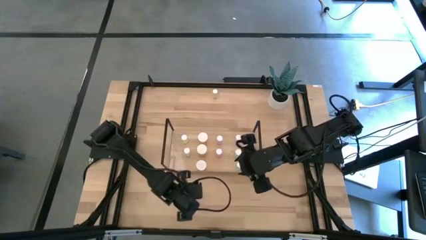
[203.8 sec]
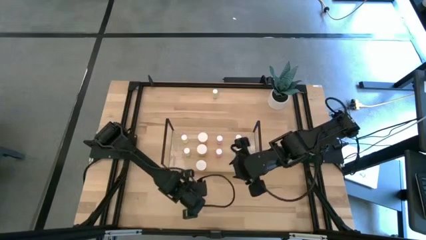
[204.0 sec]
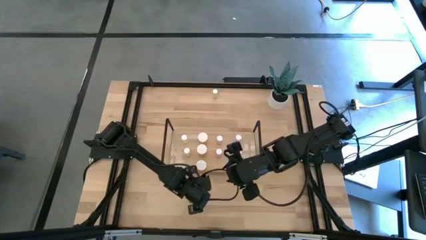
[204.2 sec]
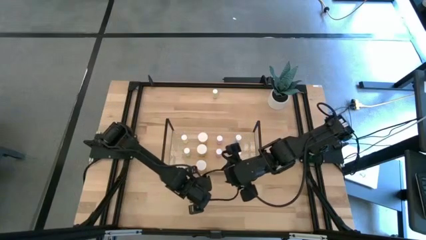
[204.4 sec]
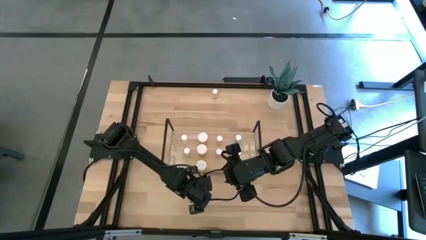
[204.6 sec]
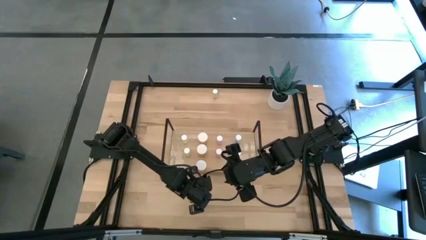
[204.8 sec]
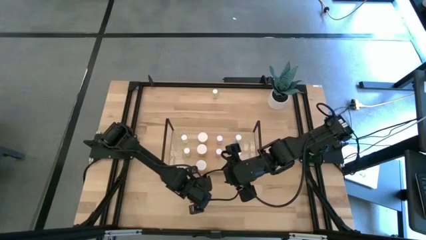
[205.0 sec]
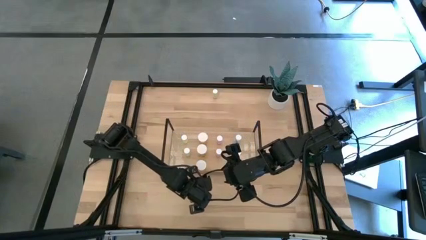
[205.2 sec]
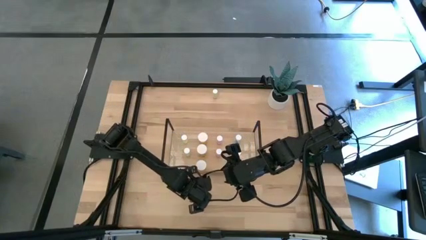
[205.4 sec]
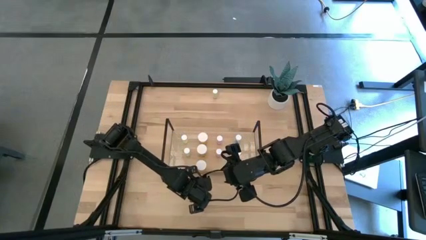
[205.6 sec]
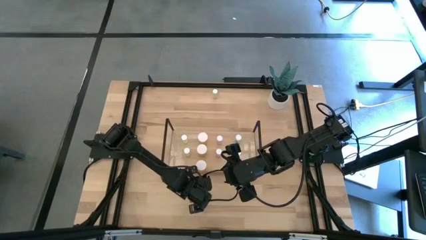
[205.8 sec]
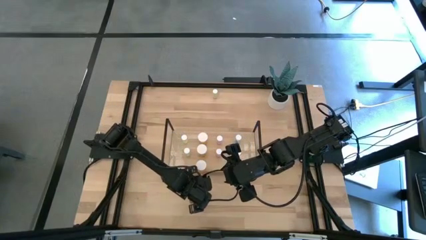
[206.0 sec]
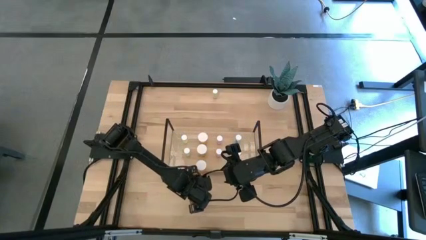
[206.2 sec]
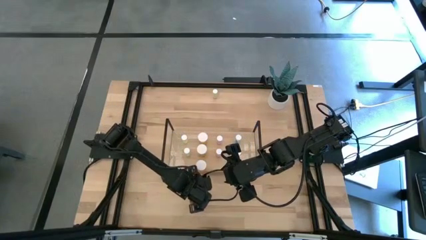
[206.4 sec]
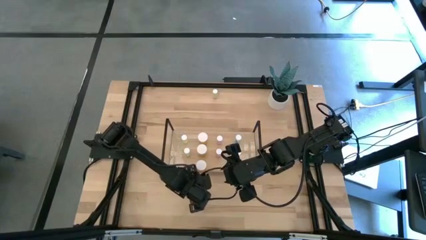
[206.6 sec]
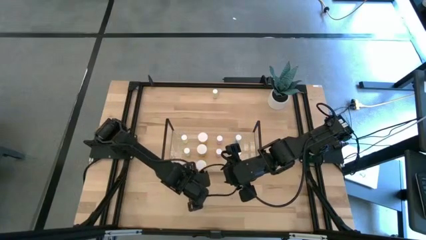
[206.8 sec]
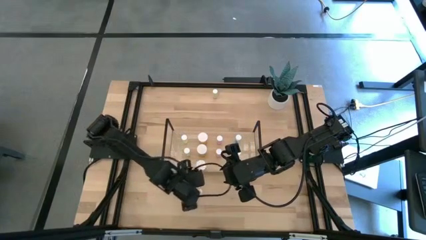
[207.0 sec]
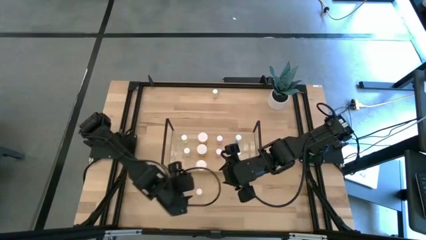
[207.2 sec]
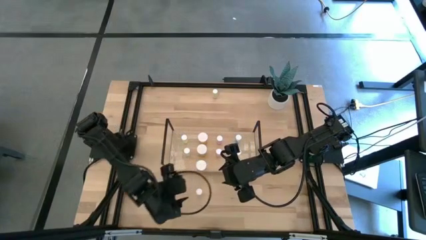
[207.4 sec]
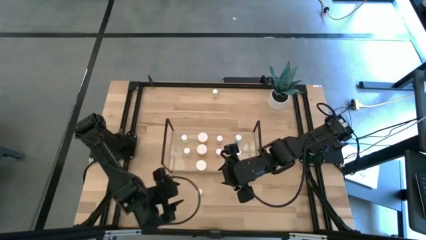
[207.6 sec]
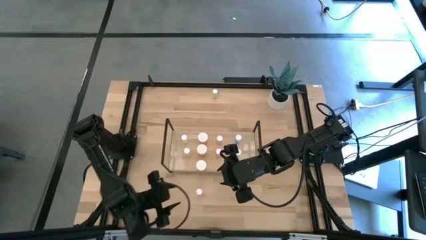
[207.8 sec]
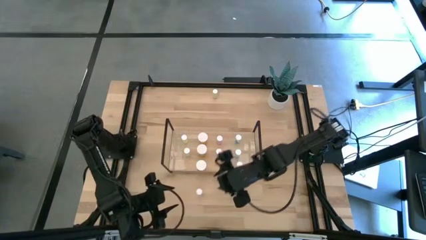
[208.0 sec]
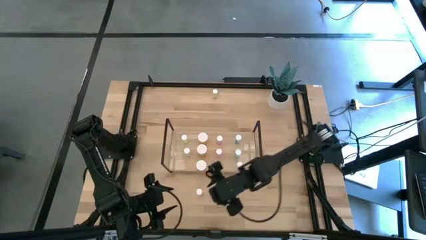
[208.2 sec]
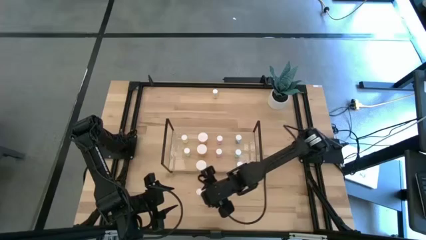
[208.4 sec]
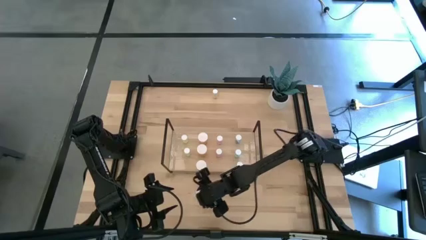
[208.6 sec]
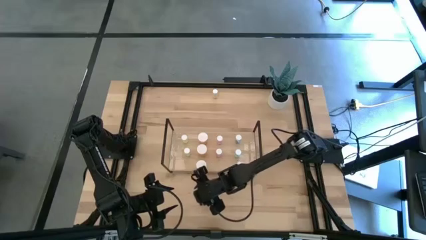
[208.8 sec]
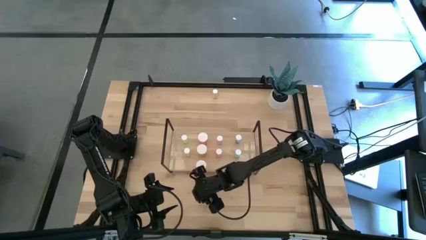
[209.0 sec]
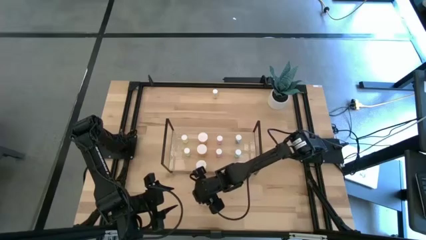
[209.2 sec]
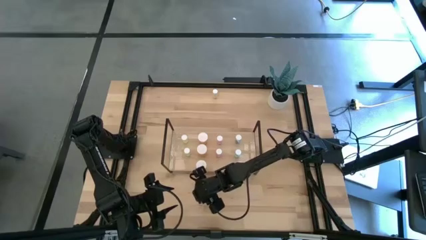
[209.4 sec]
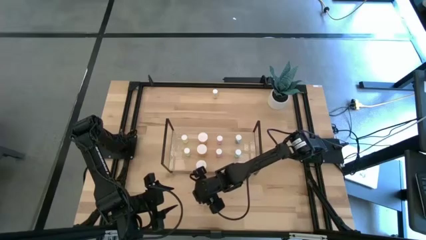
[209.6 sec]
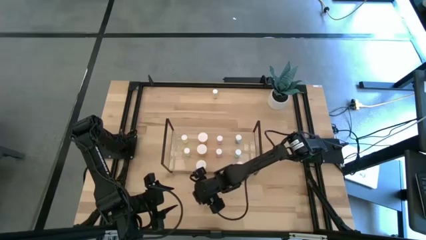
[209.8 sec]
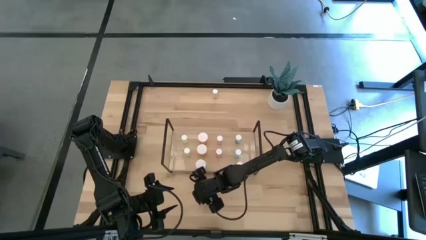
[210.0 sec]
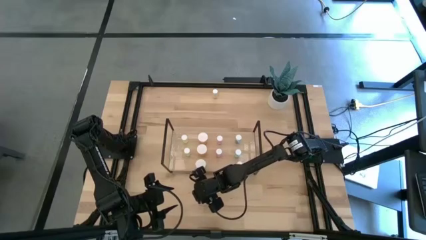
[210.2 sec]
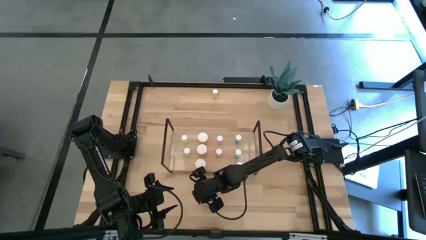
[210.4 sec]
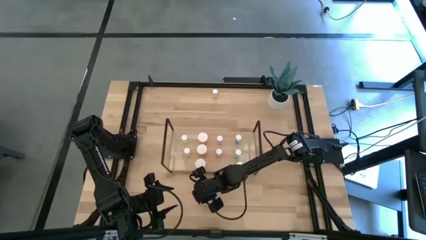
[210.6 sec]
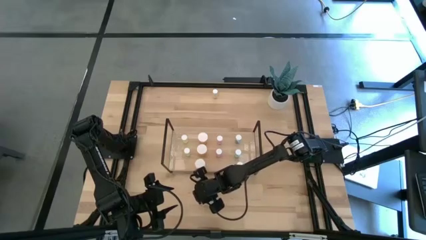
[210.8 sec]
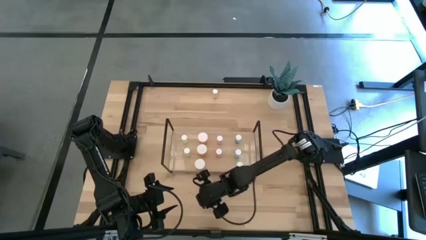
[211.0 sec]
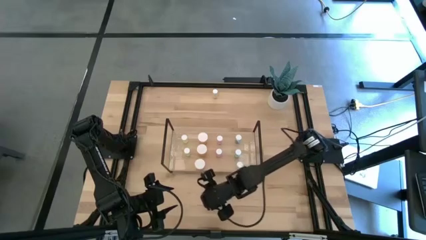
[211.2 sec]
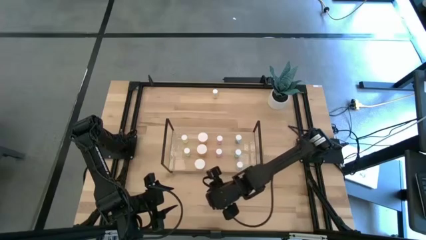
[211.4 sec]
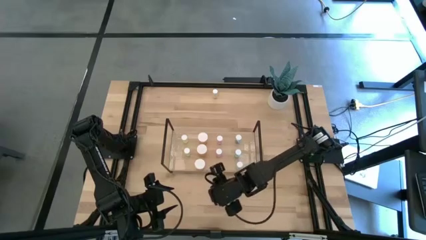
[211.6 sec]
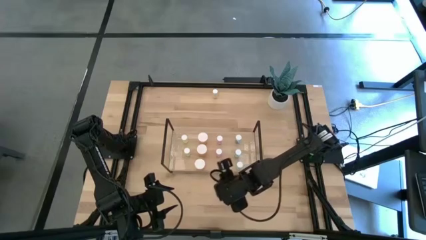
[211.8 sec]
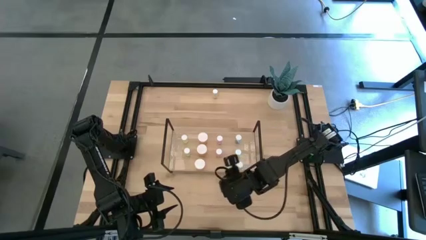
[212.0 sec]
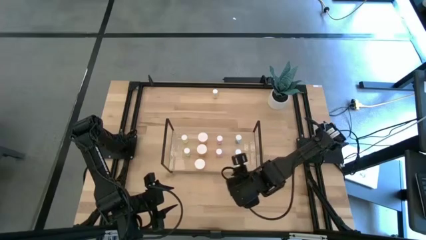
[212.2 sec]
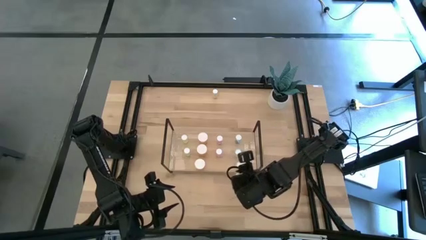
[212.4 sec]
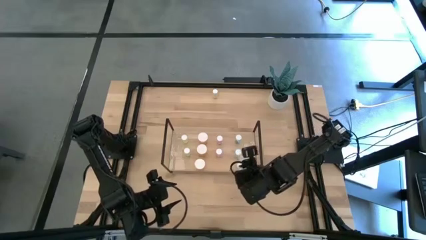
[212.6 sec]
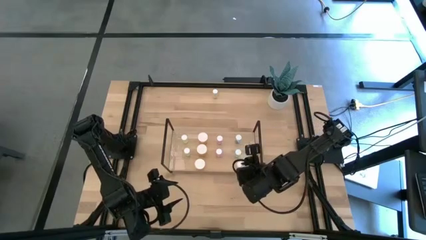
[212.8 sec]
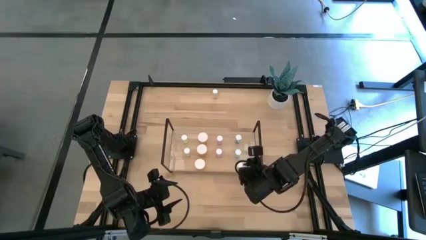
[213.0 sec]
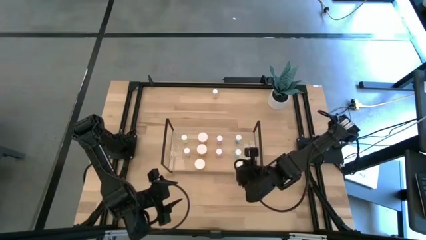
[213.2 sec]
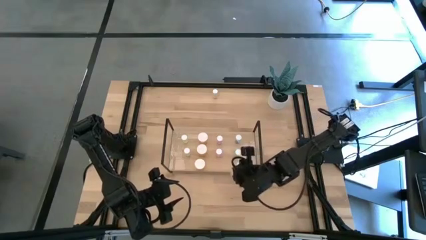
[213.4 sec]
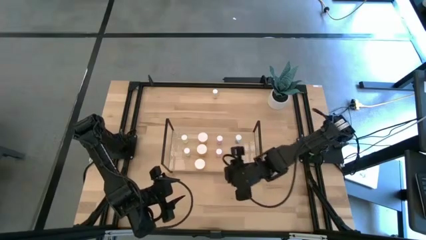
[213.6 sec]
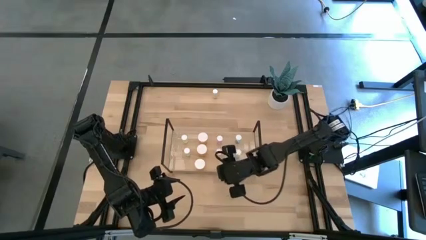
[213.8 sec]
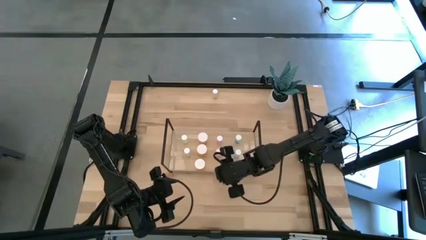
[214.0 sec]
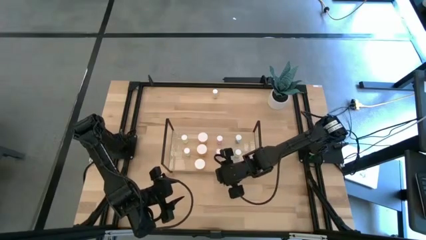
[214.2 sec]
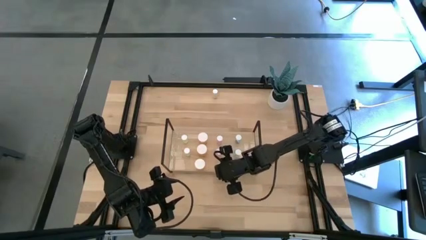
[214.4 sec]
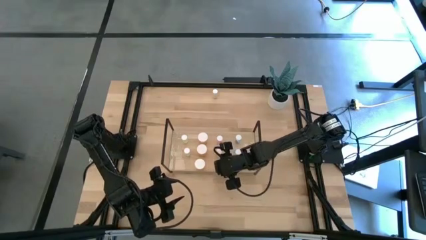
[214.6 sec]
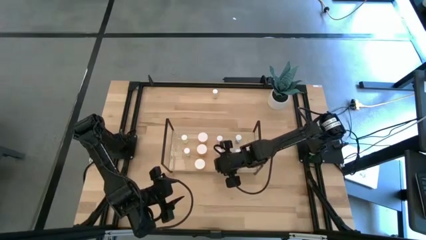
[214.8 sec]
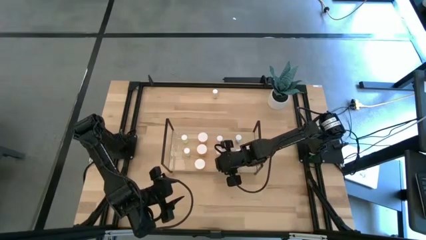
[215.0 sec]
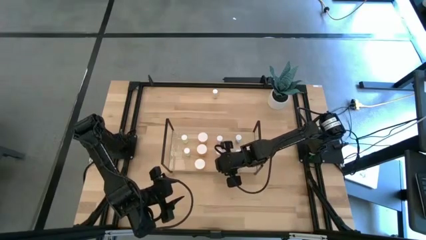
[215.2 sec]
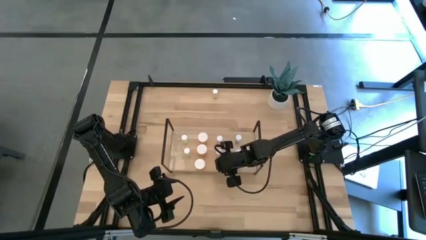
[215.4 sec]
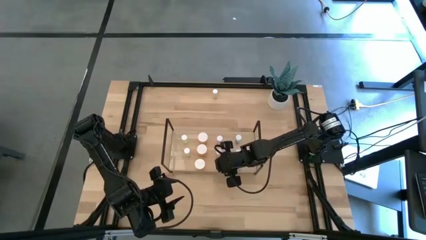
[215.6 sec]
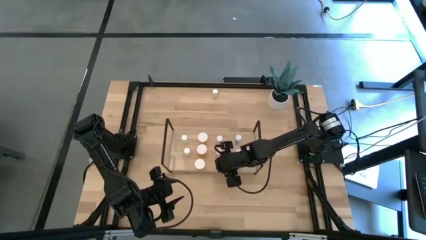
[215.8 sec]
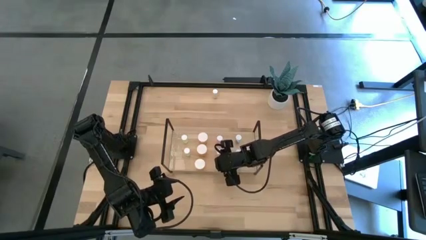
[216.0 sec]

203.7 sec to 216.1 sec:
Task: Pick and place medicine bottles onto shelf by color
Put the pink pill bottle aligned with the pink pill bottle on the shelf

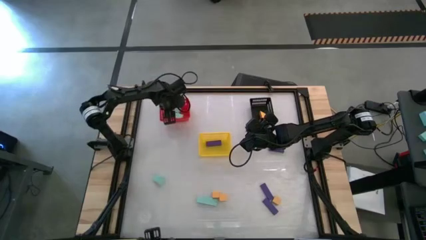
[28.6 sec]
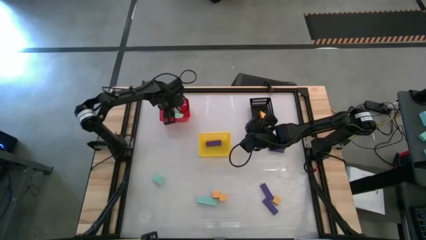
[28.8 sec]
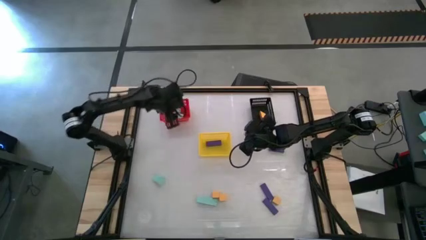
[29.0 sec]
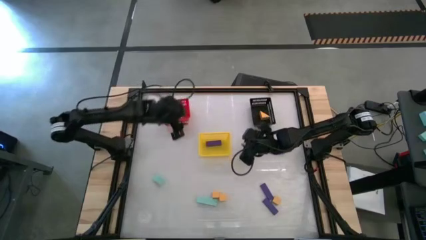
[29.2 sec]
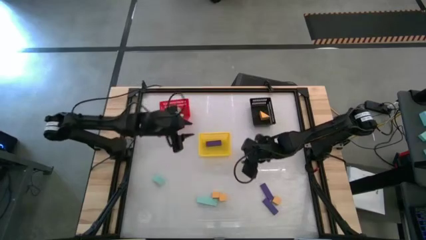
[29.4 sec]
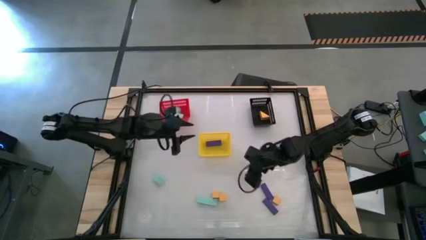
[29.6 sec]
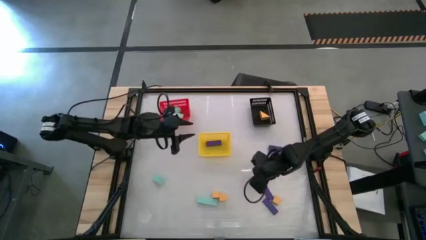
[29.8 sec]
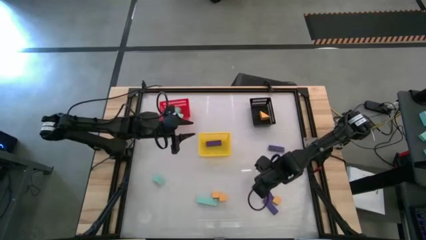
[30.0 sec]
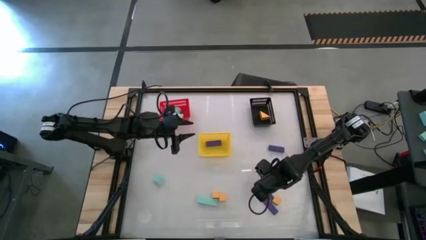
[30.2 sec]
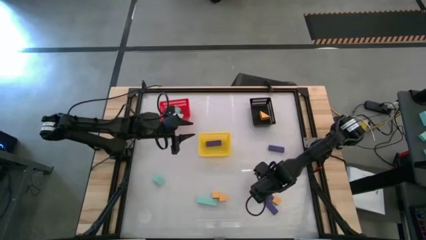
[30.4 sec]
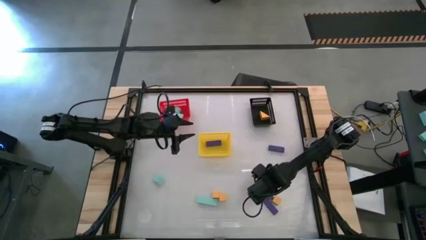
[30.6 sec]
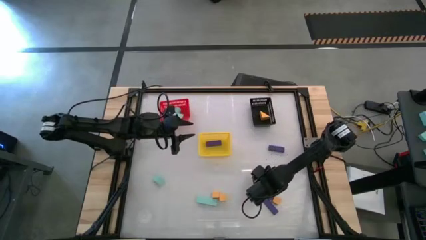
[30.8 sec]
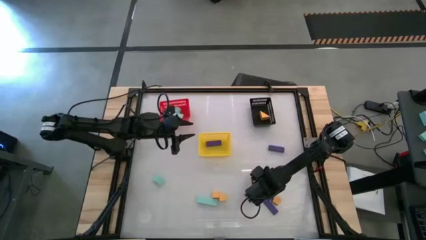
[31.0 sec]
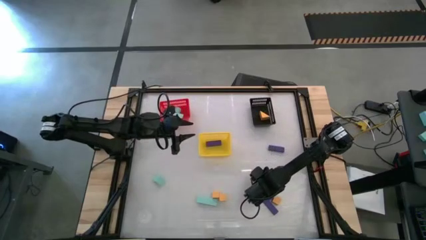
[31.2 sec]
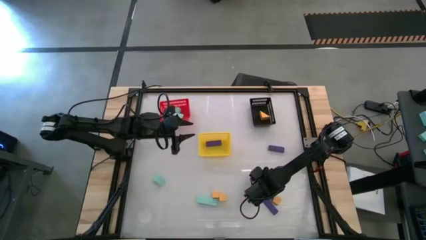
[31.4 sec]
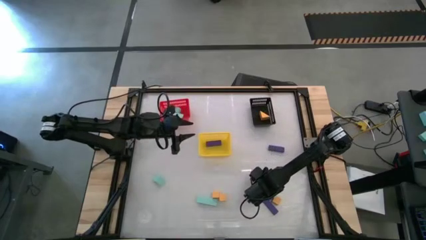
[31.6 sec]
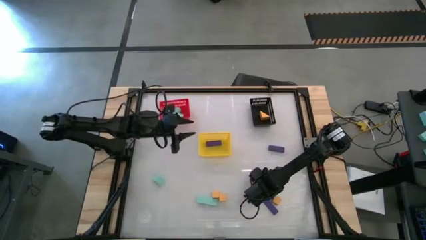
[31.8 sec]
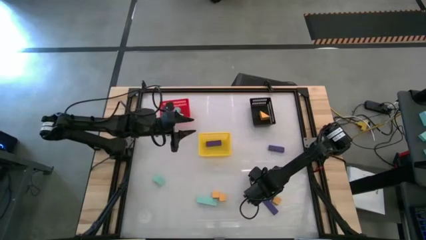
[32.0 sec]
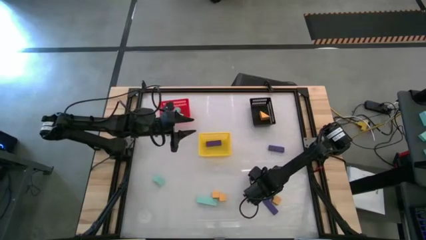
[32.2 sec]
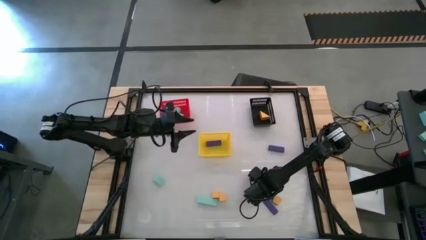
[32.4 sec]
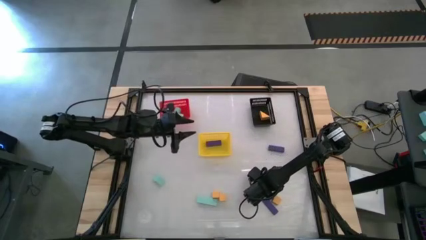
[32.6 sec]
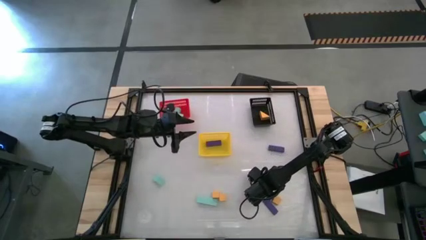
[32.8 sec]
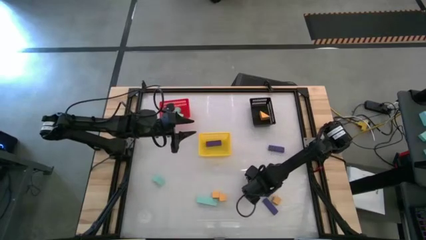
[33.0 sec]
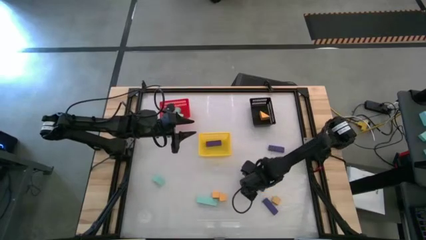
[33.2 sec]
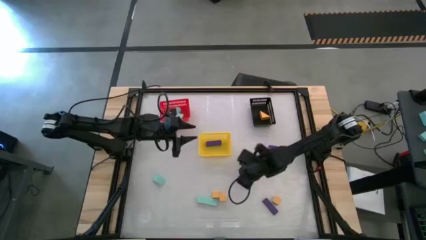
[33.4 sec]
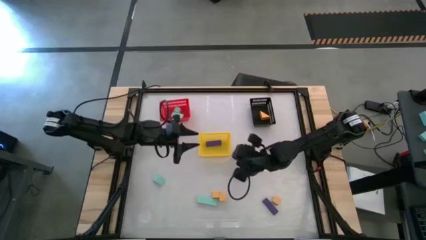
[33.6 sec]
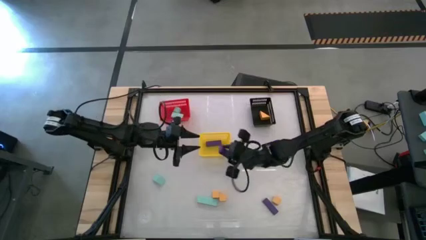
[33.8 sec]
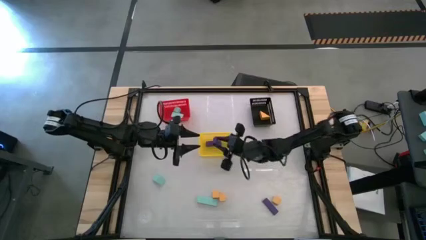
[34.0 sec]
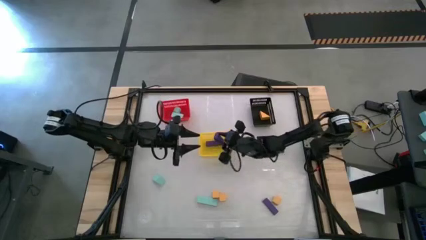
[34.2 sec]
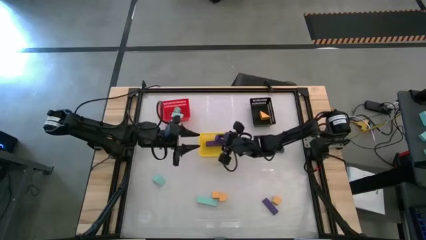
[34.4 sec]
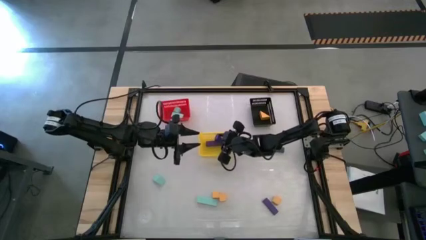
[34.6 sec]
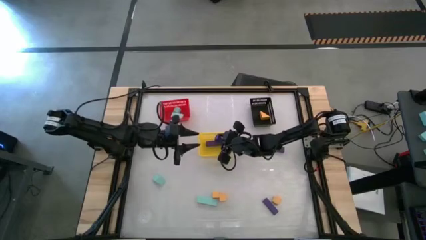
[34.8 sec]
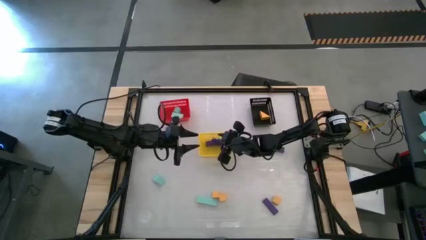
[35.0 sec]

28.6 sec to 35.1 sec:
Task: Sort & place blocks by color
Put the violet block into the yellow bin
